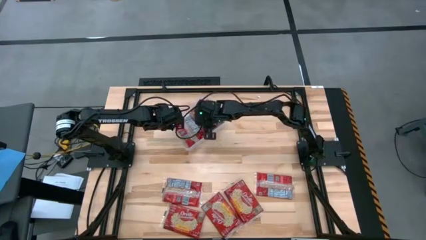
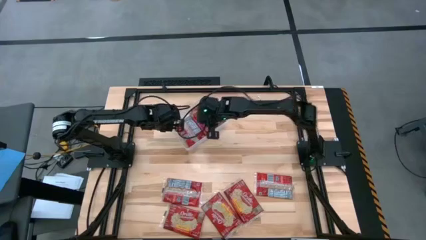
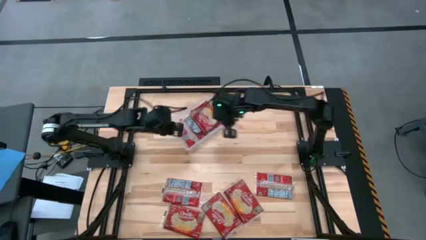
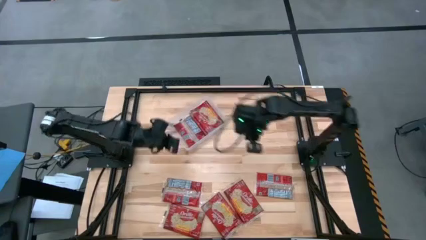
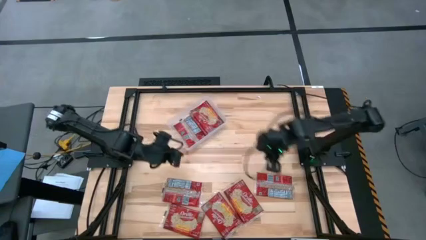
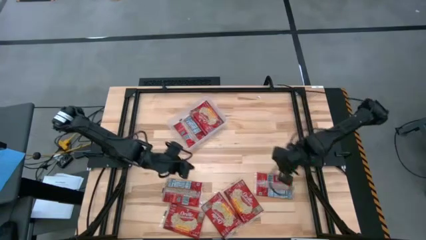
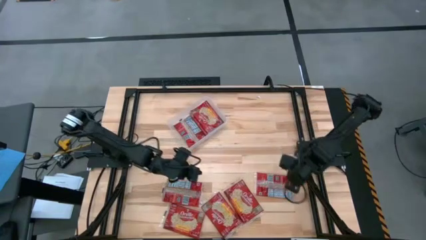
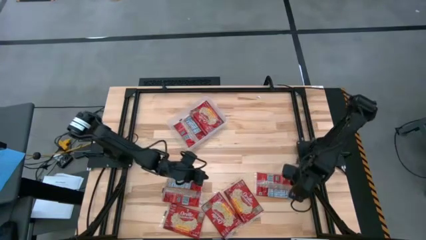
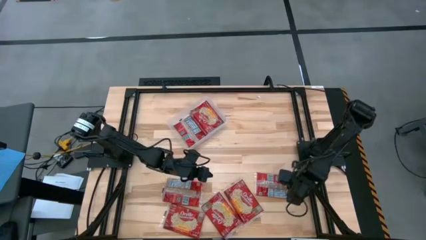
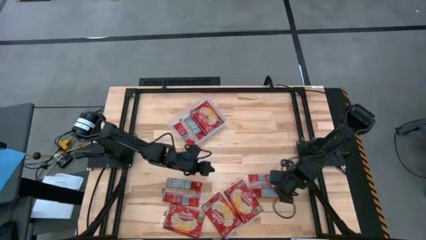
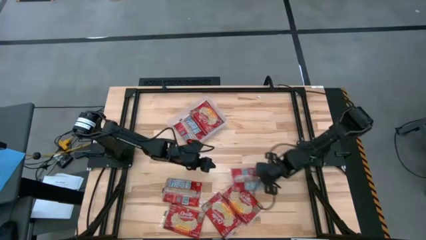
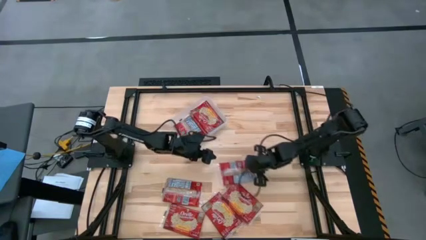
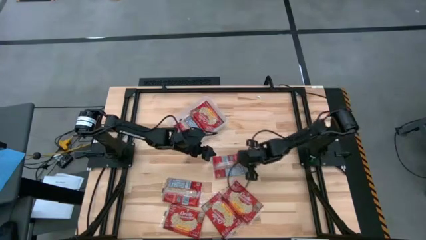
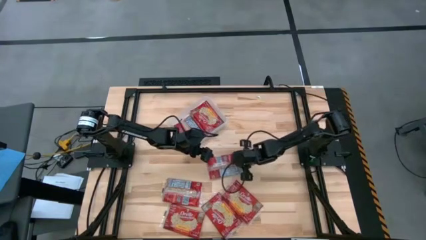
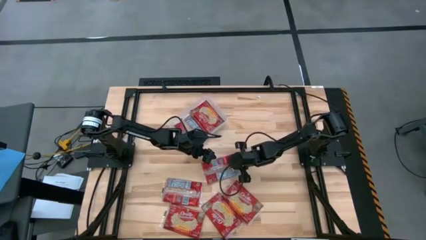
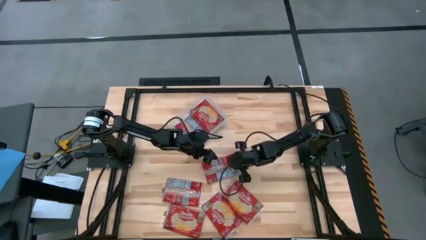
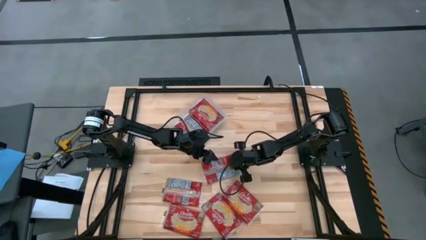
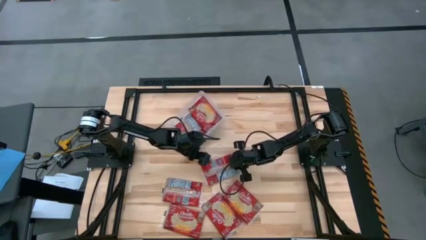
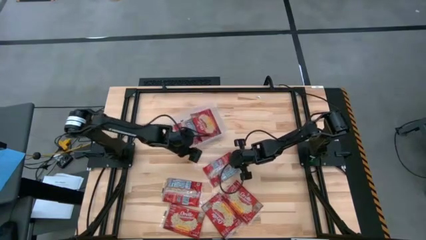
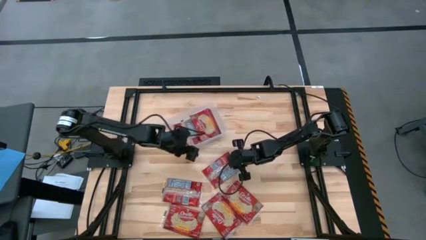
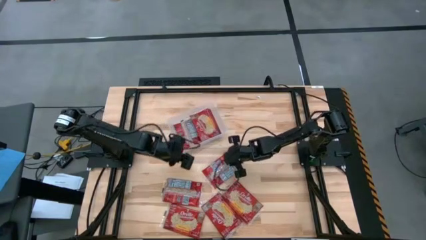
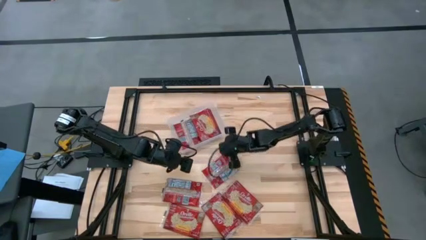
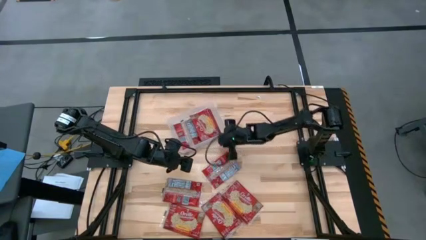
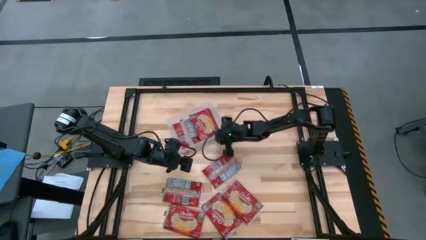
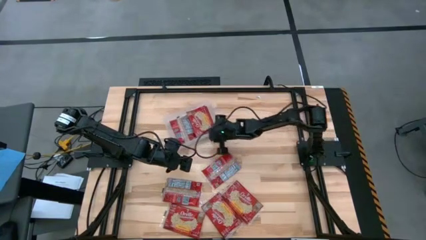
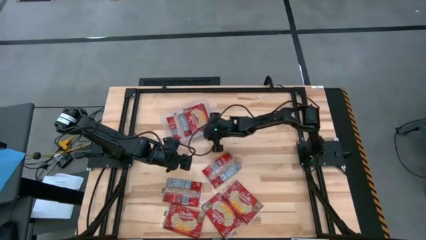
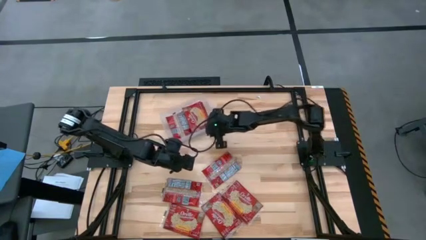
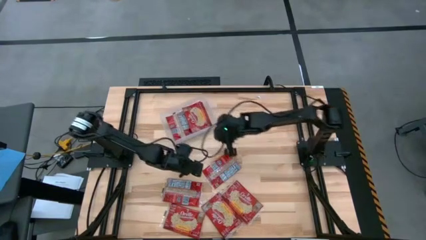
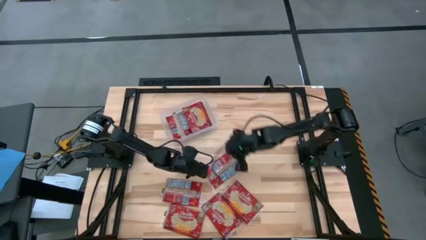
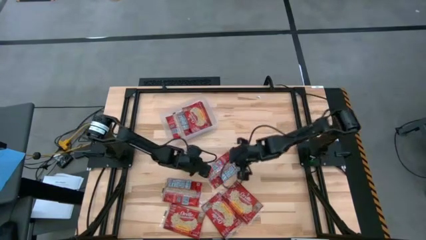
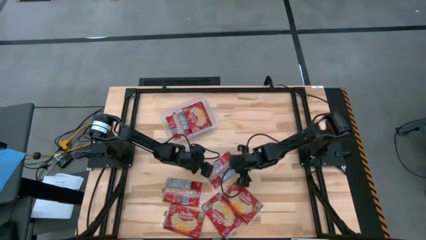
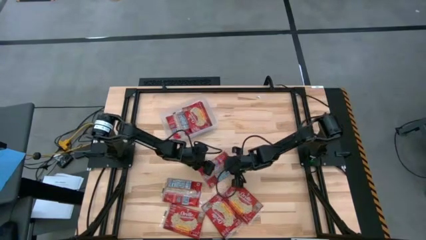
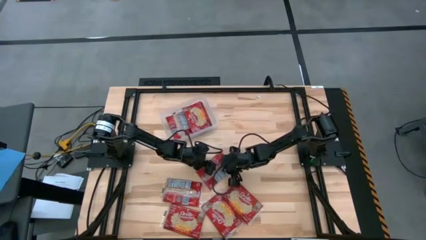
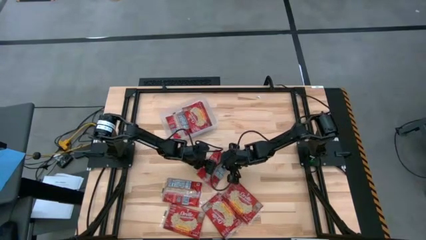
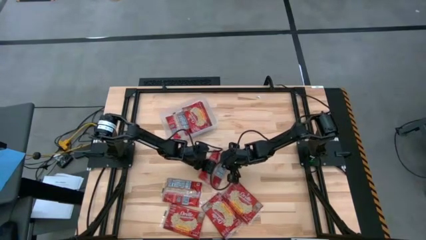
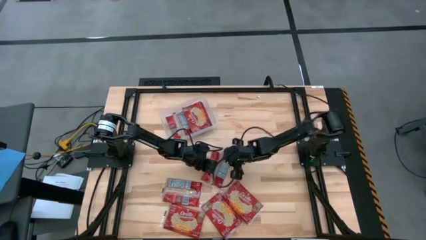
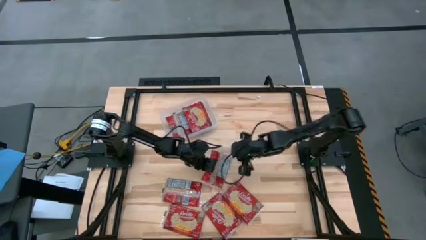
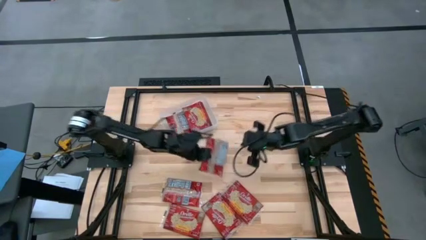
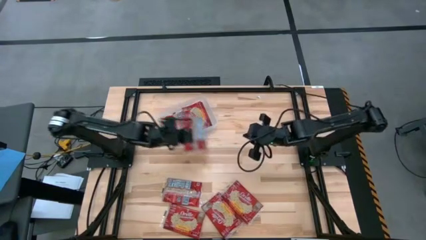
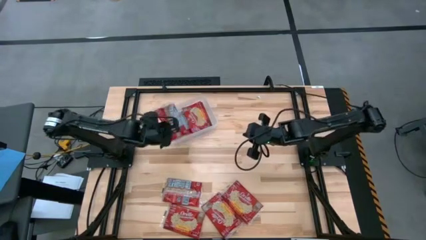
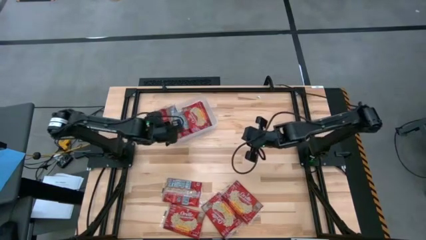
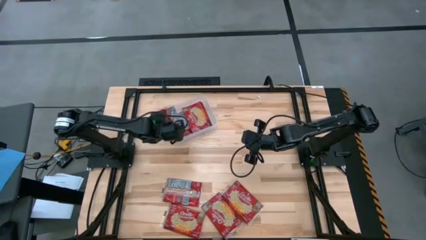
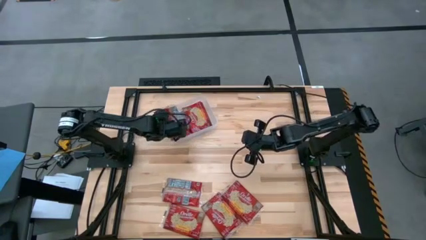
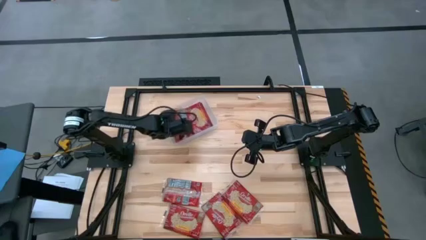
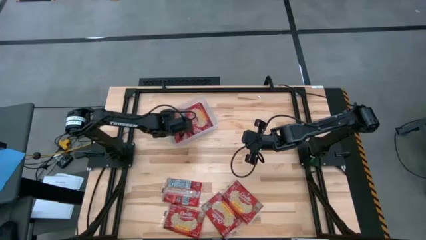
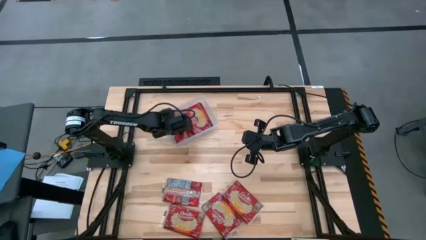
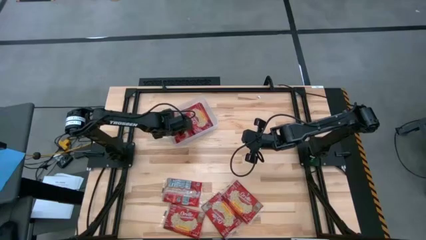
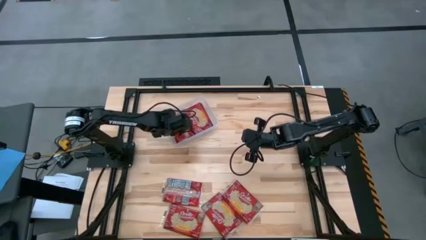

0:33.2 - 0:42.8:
Task: Sort popcorn bags into baskets
Put the red popcorn bag into the transparent bin

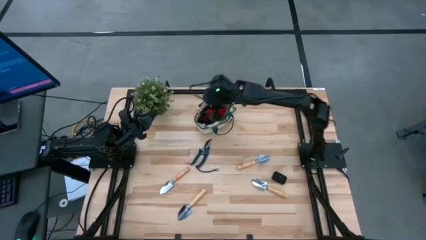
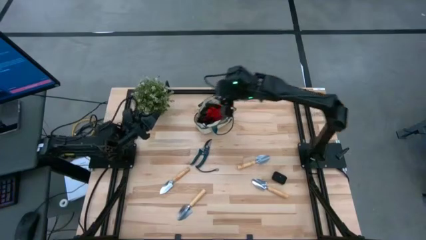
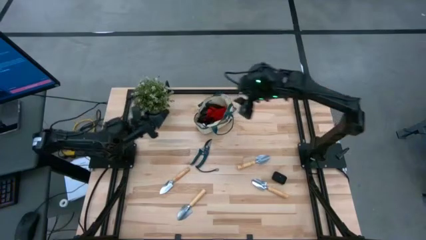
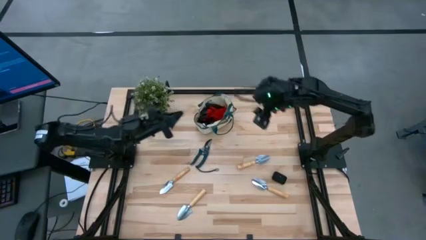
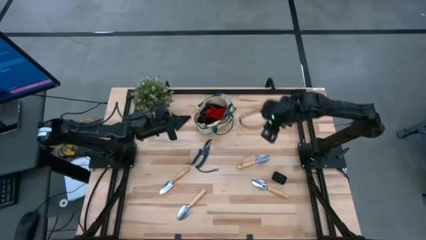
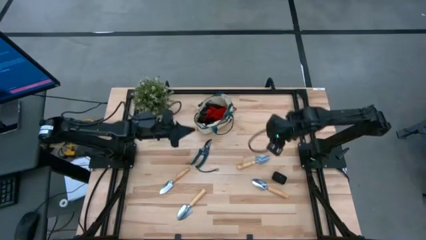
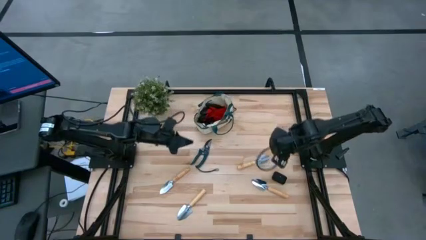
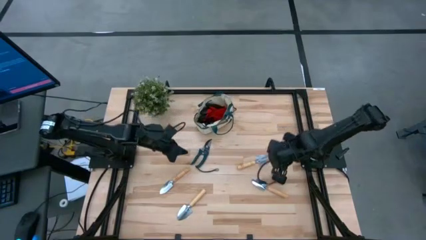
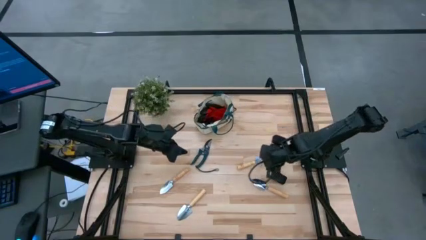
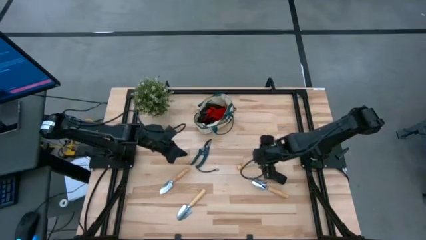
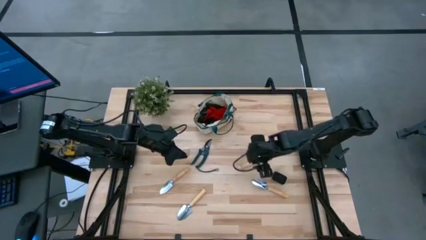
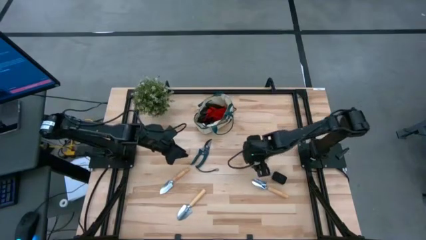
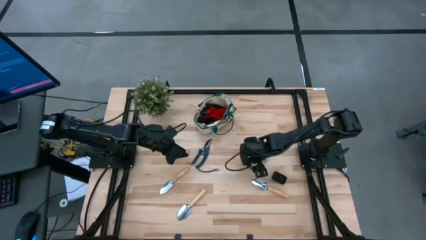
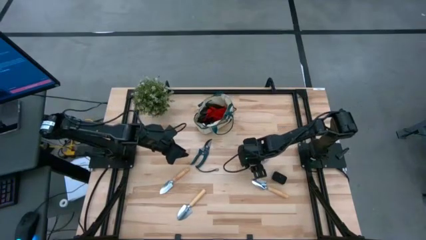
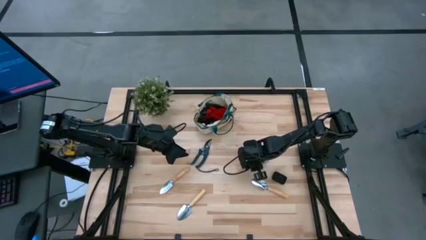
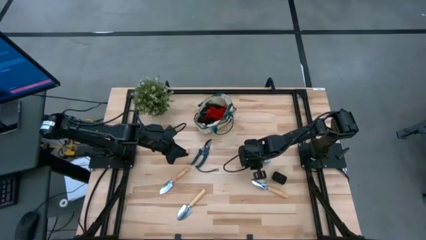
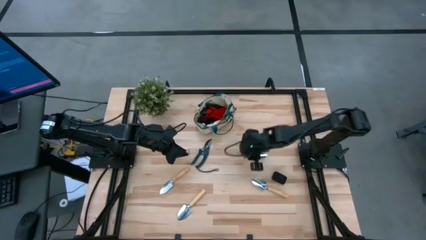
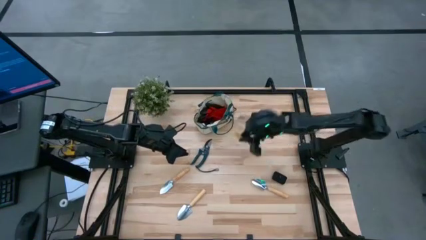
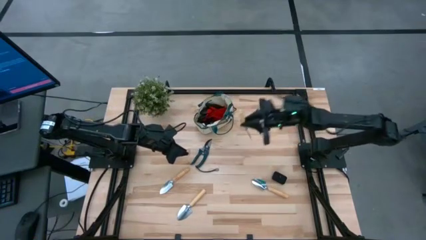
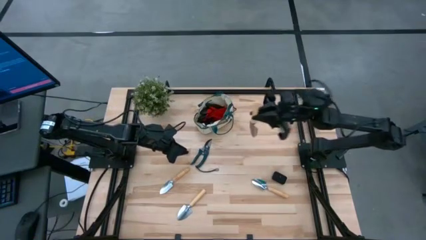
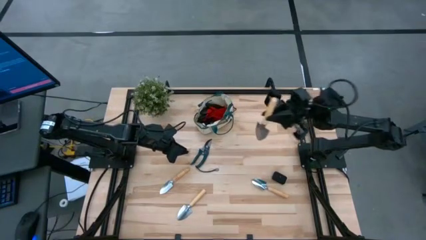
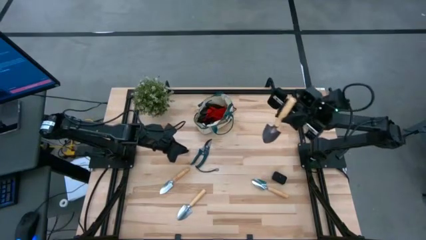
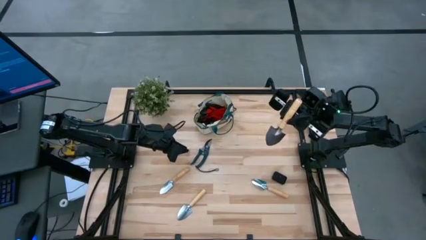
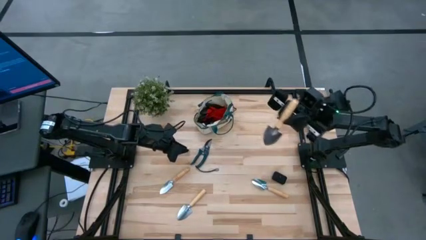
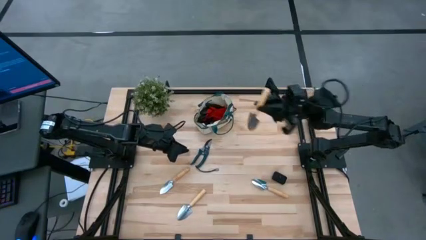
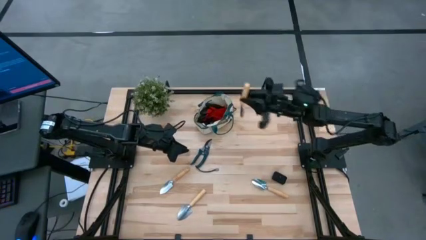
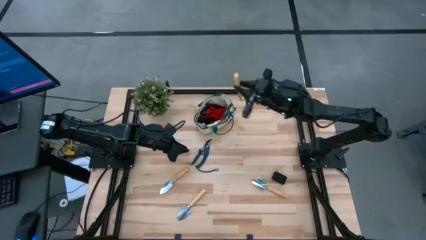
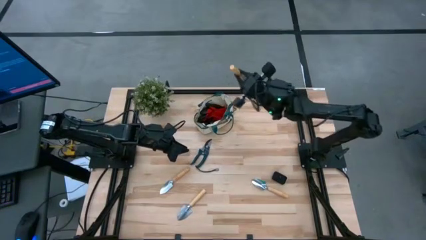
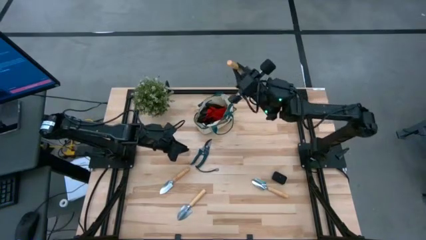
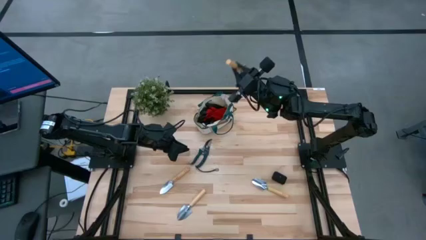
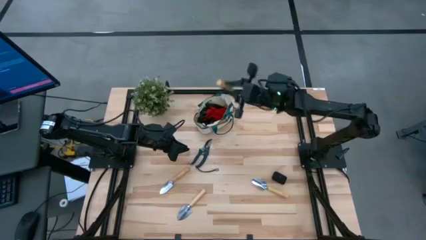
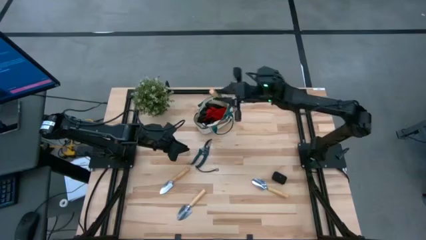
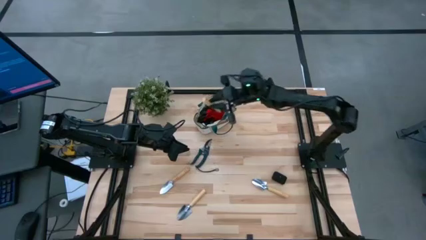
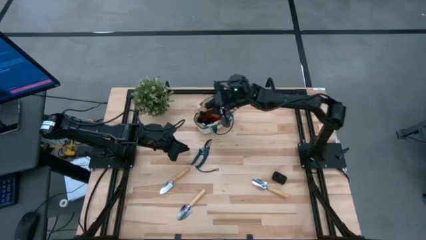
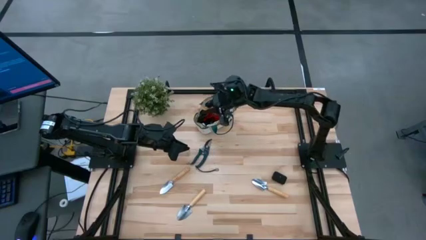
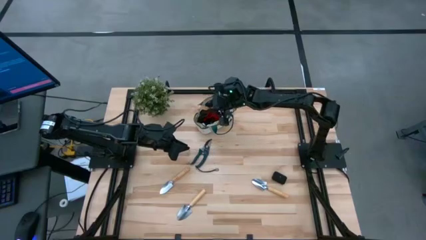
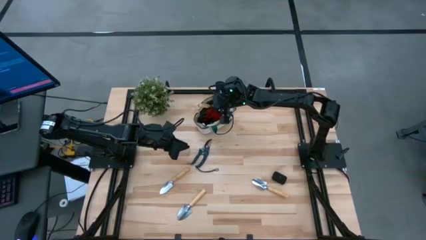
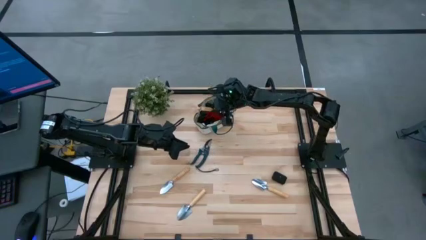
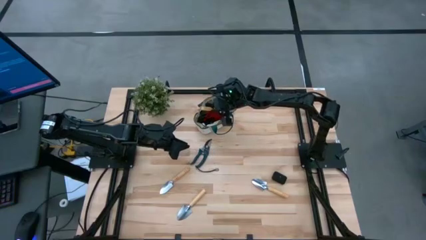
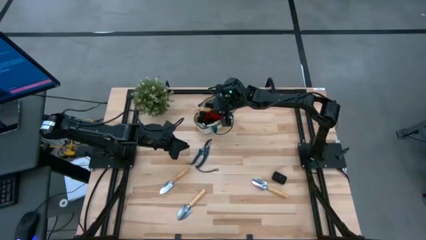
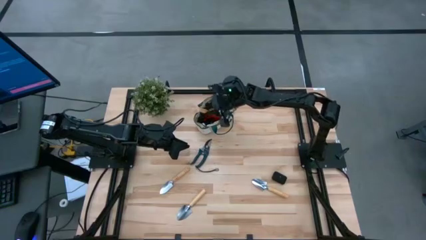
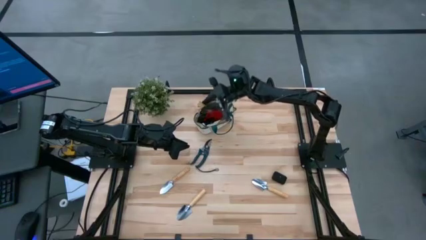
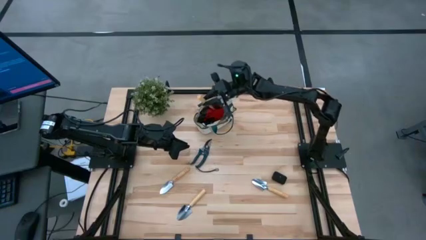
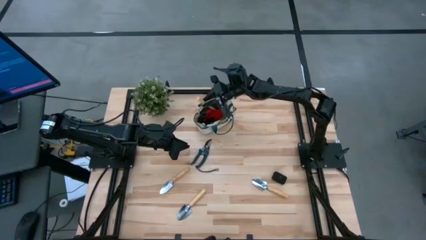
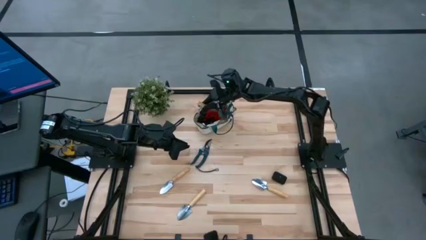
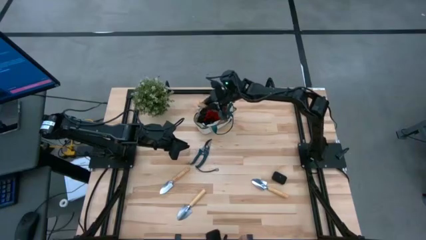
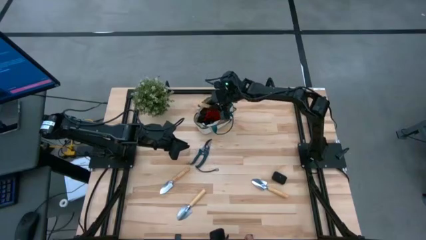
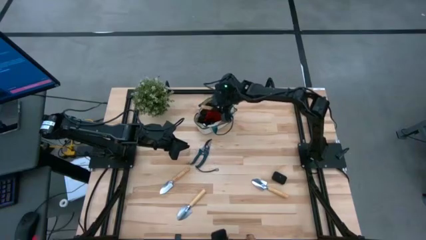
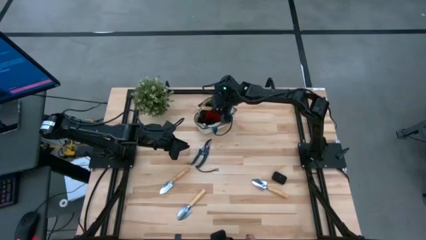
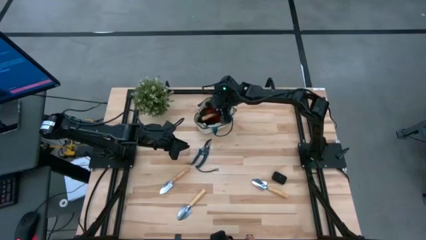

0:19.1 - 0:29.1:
Task: Pick & Place Garden tools in Gardening bag
Put the brown trowel into the light brown gardening bag
